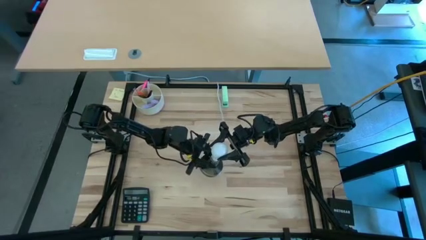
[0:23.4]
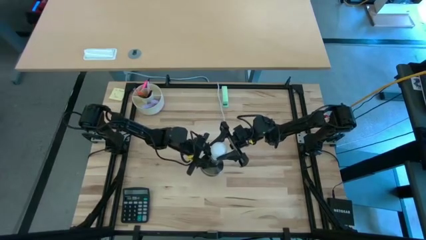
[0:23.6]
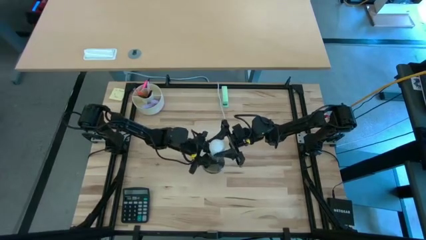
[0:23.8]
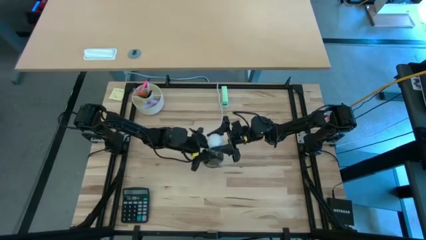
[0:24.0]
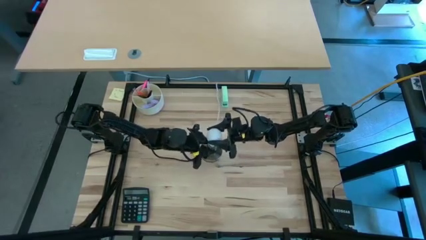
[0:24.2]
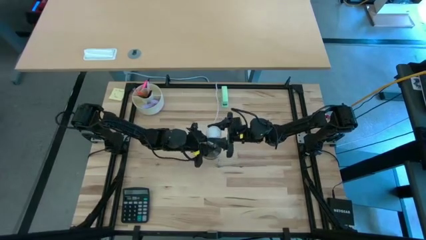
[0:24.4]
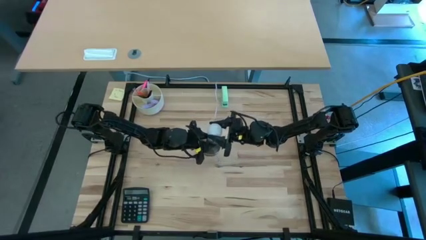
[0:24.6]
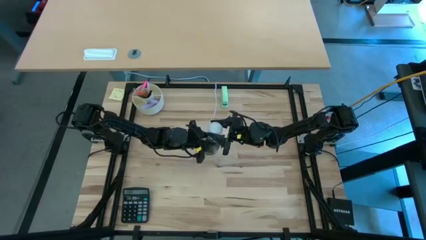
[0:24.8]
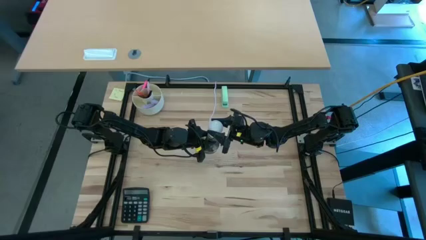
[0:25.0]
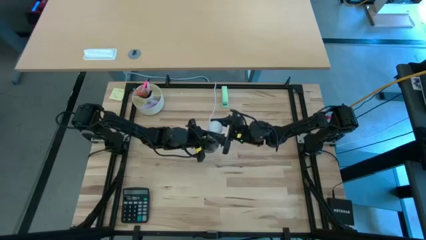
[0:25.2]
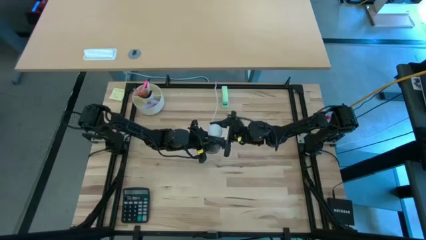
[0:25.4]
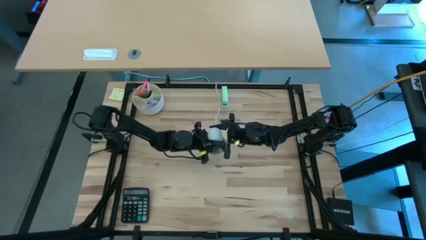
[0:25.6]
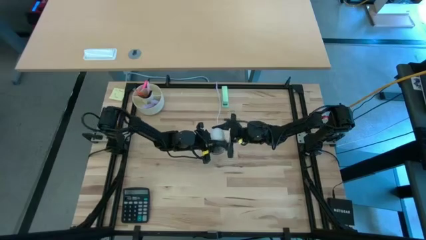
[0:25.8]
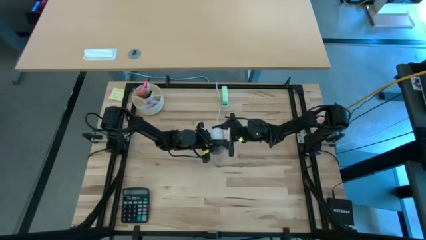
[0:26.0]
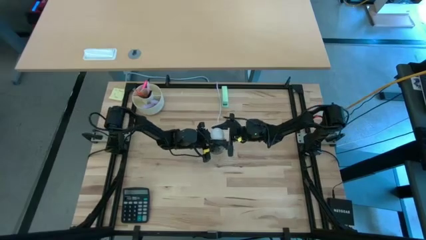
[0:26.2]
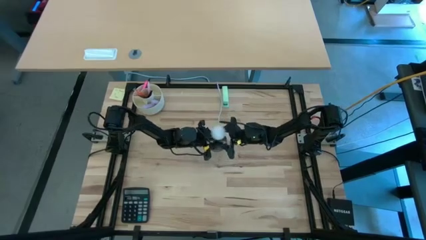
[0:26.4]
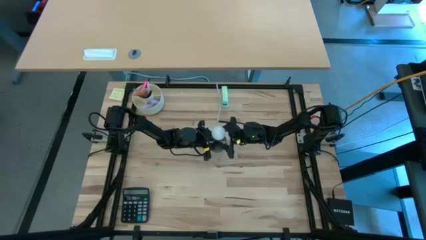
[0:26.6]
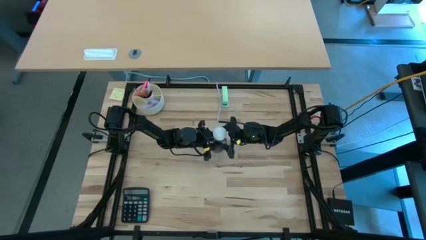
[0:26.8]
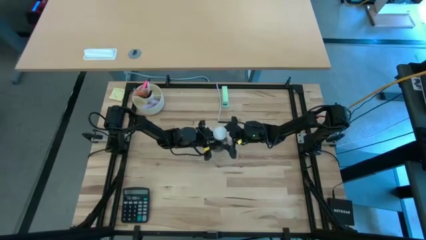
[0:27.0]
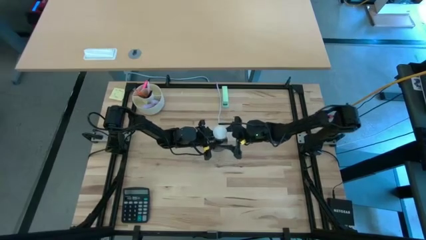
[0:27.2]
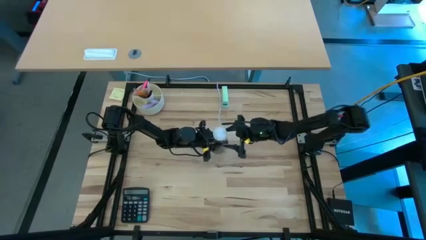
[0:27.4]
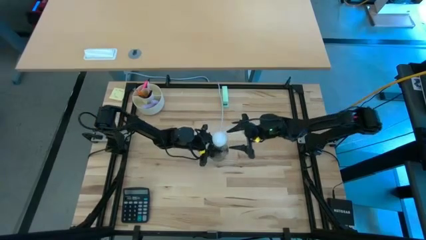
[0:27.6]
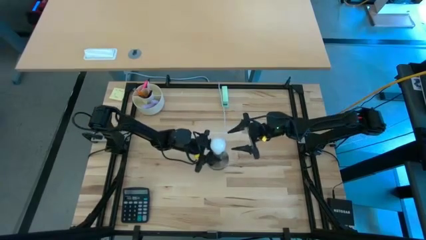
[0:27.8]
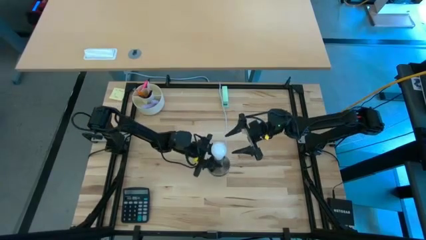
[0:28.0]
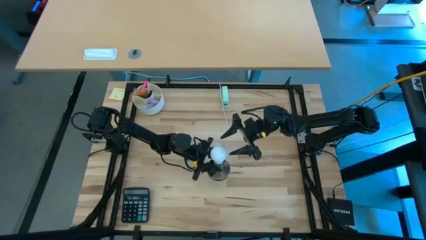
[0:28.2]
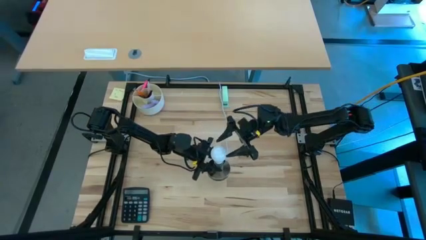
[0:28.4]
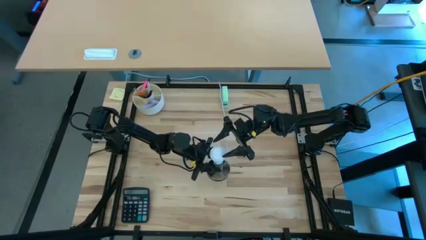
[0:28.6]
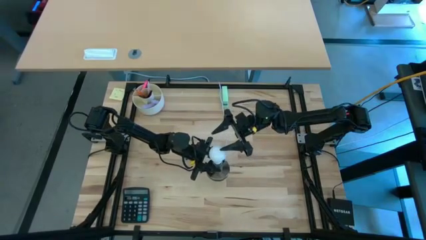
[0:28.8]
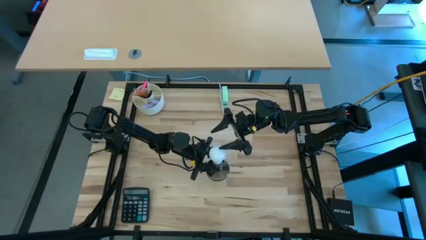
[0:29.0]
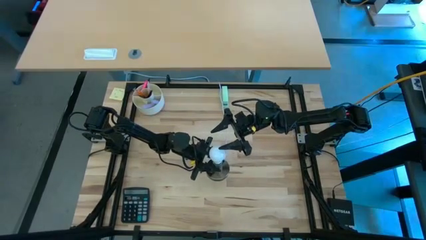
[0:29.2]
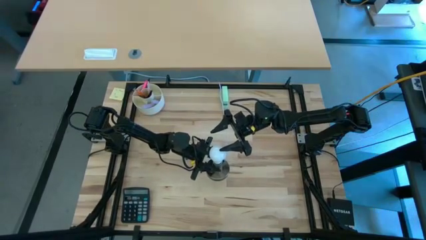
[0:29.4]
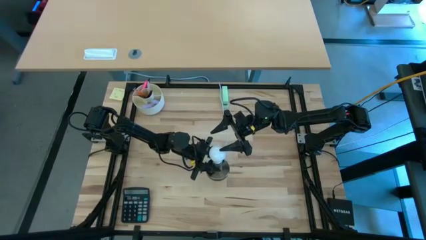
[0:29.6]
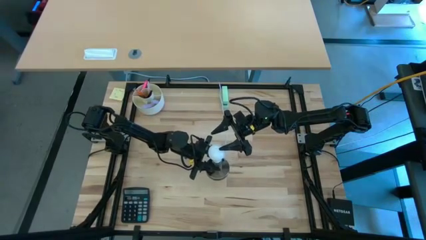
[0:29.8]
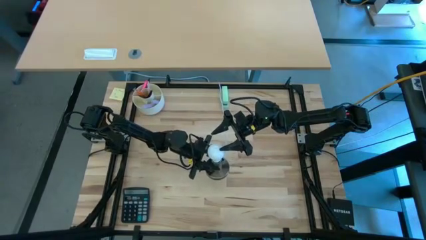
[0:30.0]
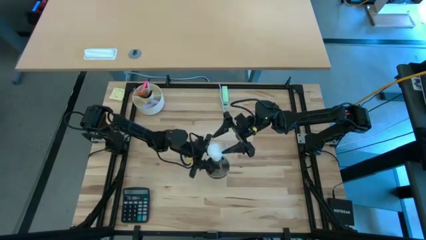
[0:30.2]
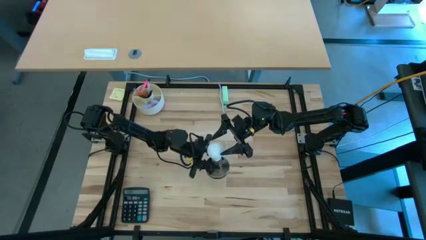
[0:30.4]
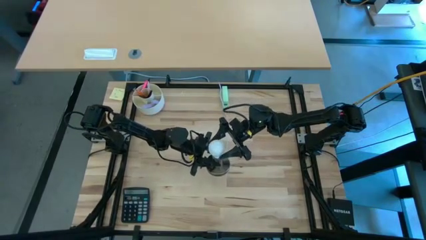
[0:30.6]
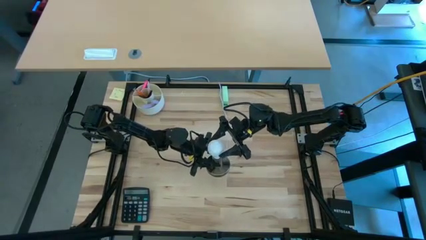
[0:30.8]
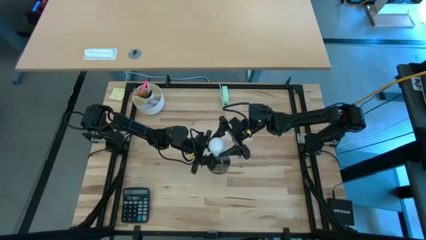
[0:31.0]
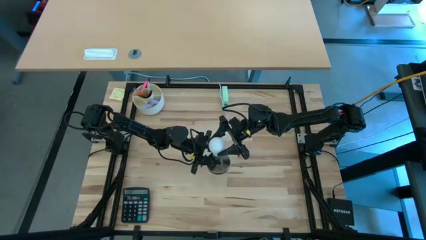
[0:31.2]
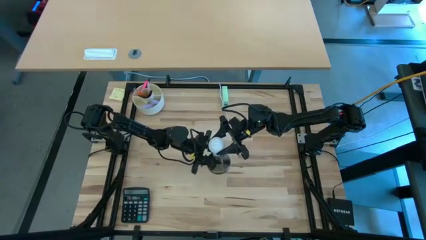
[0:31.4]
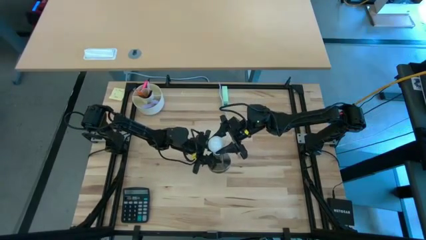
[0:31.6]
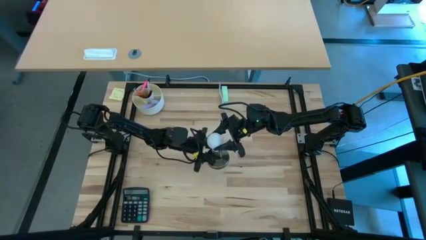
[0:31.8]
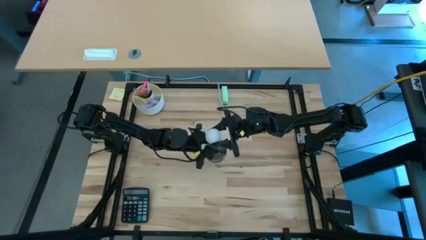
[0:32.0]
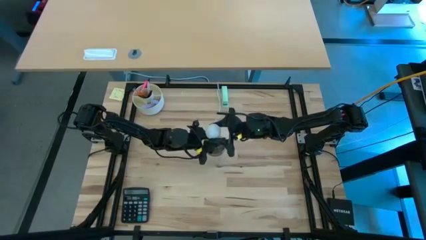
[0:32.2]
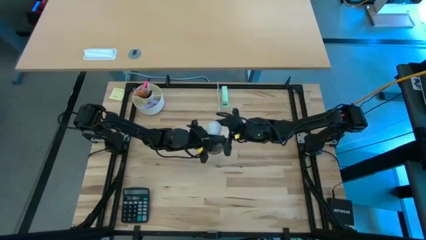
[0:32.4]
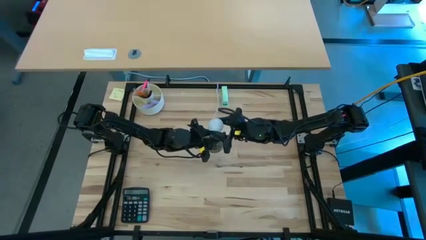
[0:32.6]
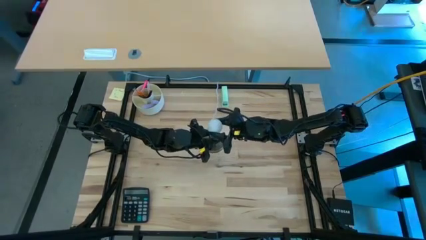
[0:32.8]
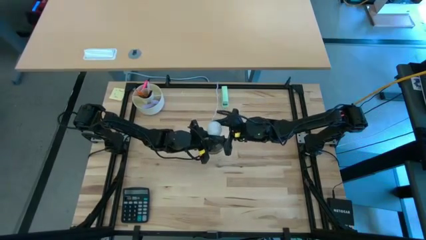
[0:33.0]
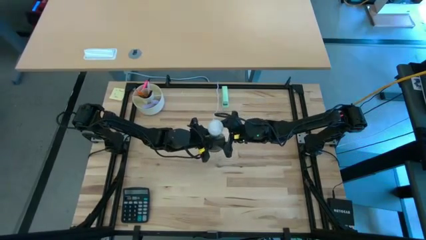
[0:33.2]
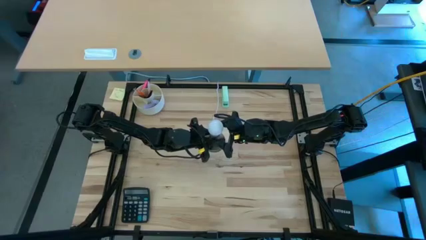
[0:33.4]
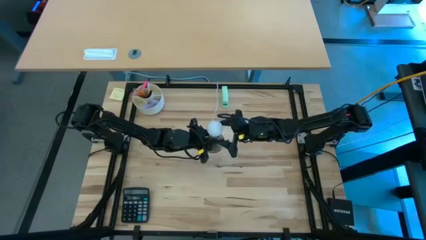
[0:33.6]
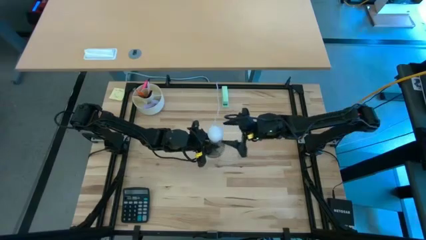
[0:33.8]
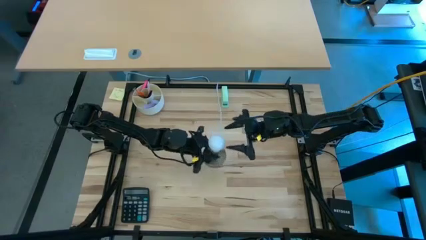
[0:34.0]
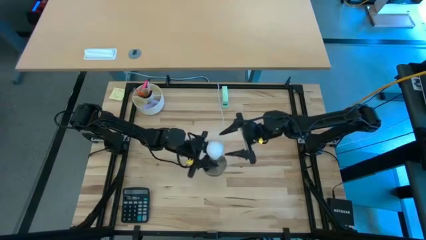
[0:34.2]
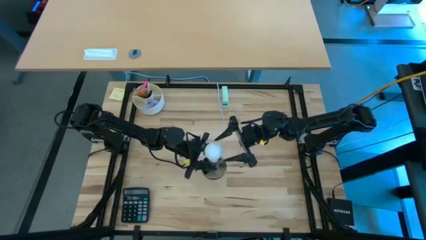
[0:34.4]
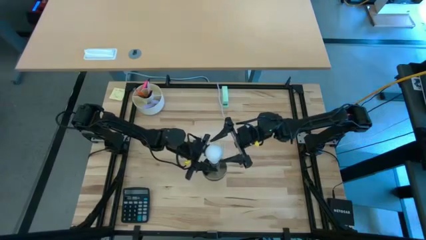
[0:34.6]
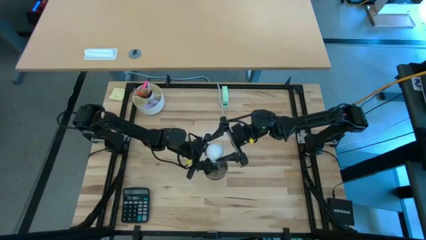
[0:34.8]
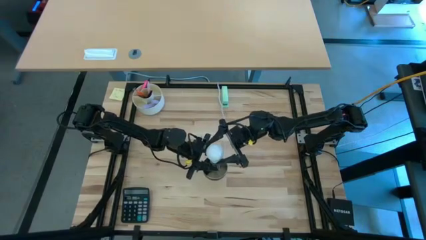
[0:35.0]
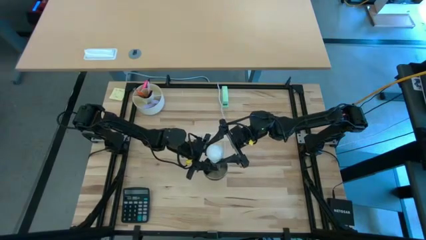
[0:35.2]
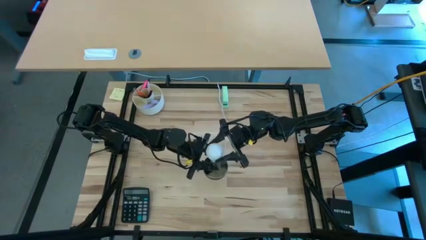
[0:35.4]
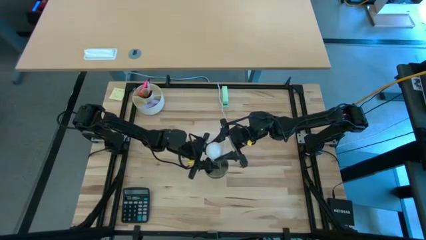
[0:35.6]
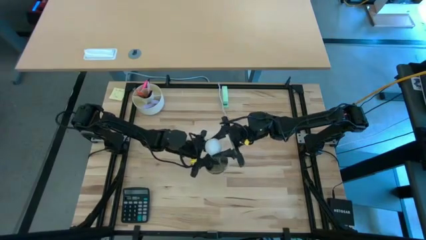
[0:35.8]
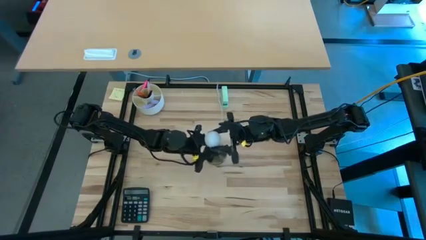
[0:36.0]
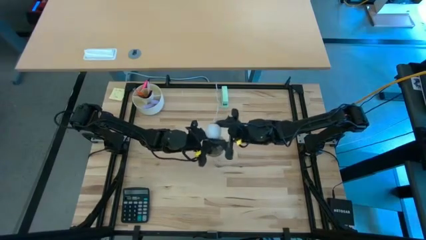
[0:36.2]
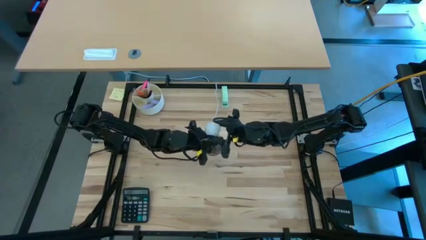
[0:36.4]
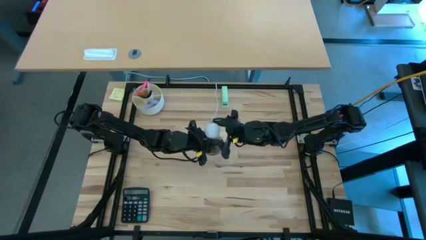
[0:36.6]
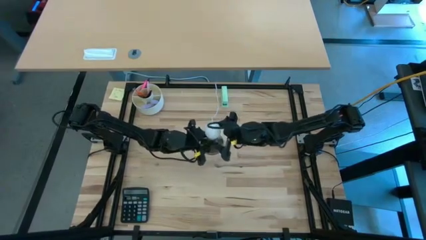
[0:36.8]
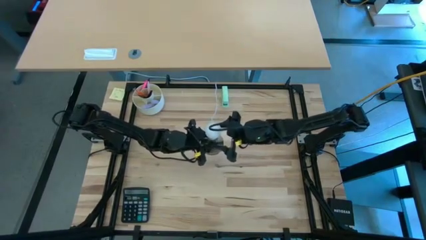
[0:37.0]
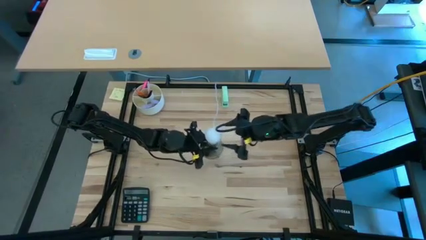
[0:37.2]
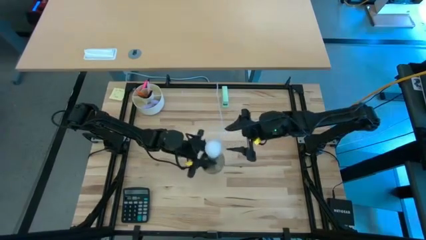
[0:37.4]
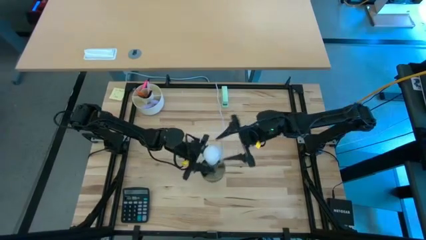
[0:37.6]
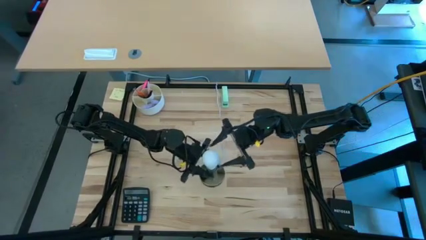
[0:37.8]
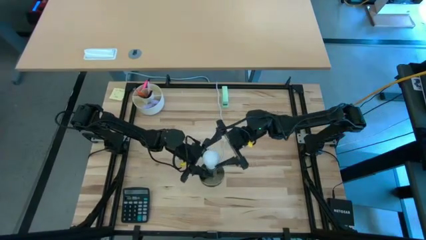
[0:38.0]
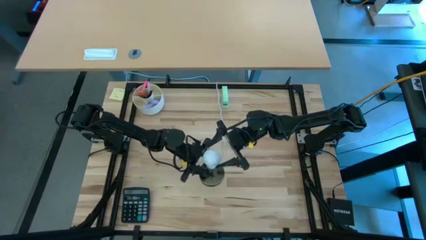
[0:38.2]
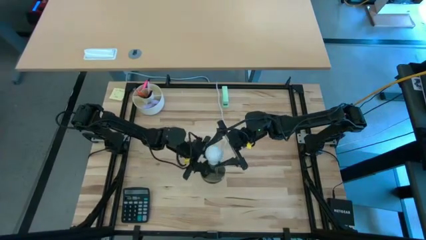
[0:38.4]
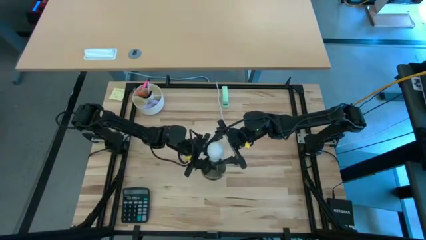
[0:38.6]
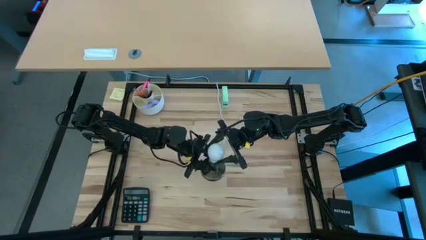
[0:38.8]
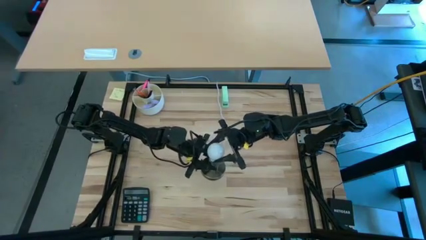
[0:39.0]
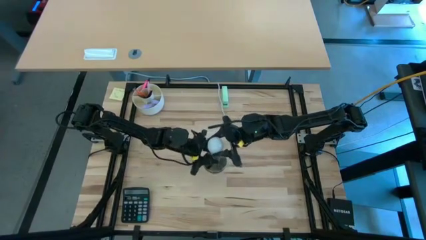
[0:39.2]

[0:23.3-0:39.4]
Task: Screw lightbulb
Insert the lightbulb into the lamp
